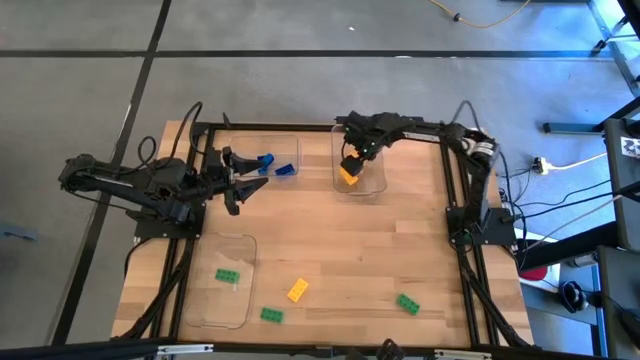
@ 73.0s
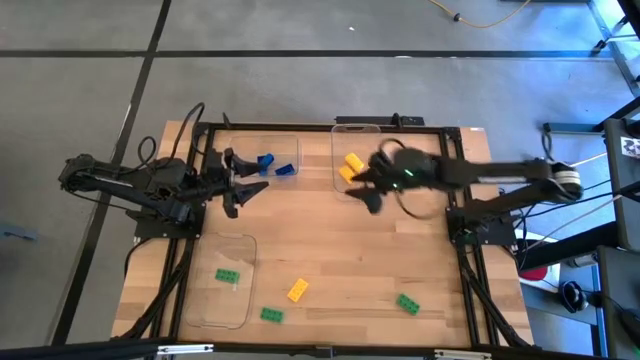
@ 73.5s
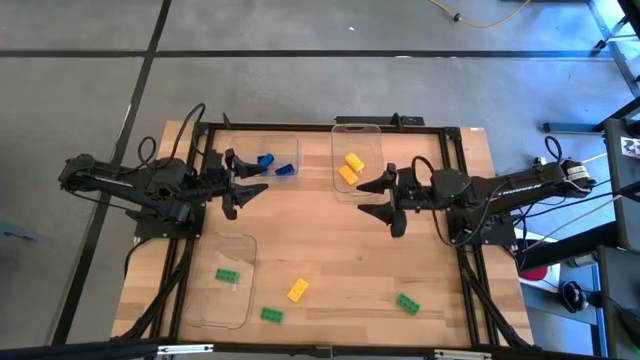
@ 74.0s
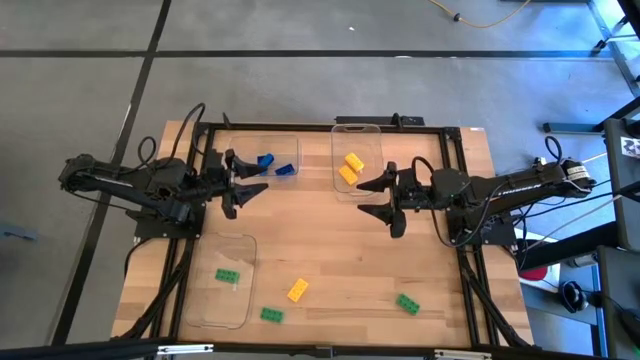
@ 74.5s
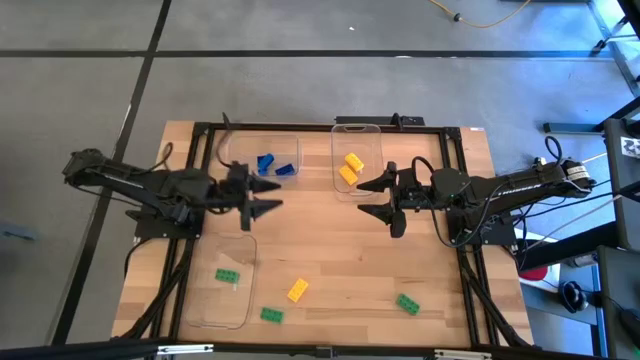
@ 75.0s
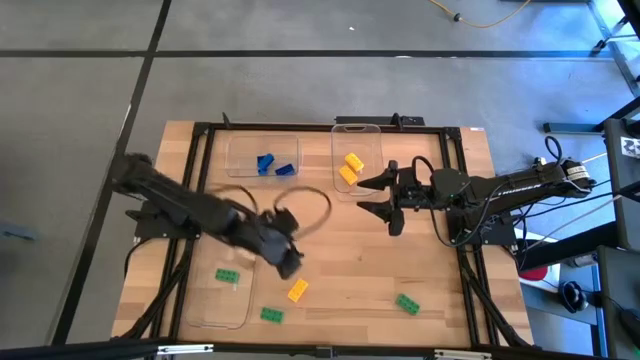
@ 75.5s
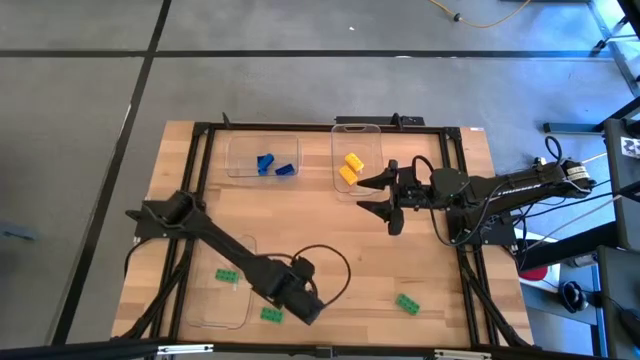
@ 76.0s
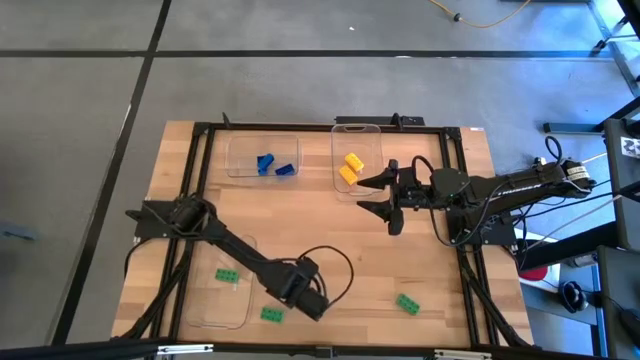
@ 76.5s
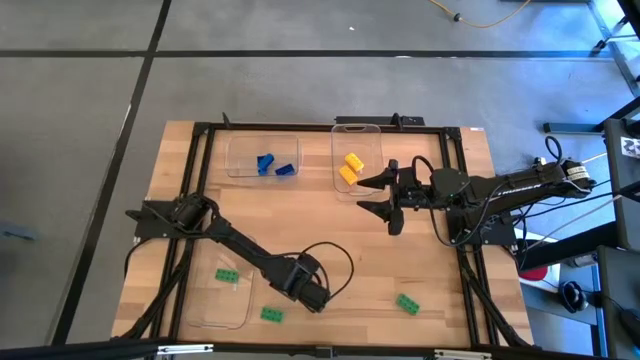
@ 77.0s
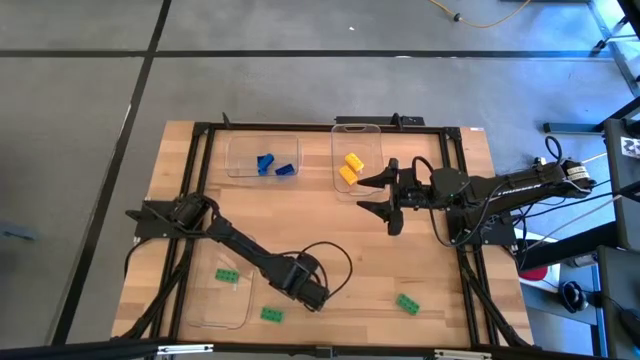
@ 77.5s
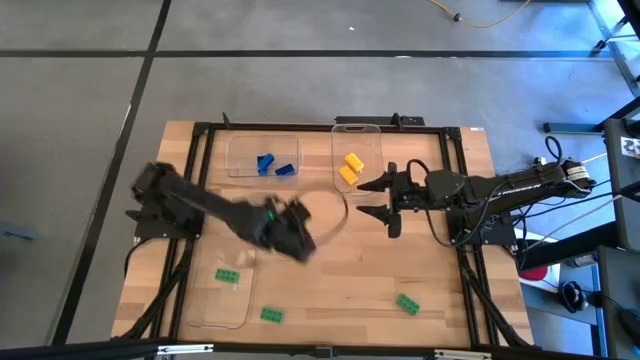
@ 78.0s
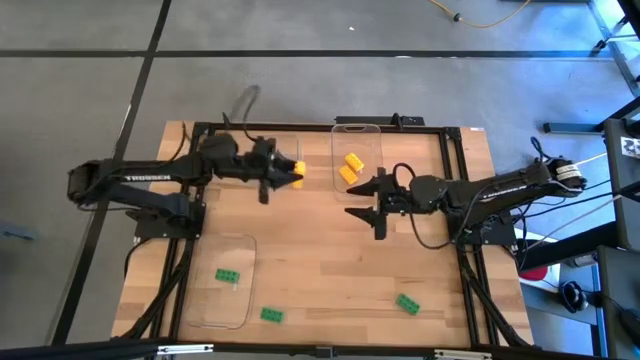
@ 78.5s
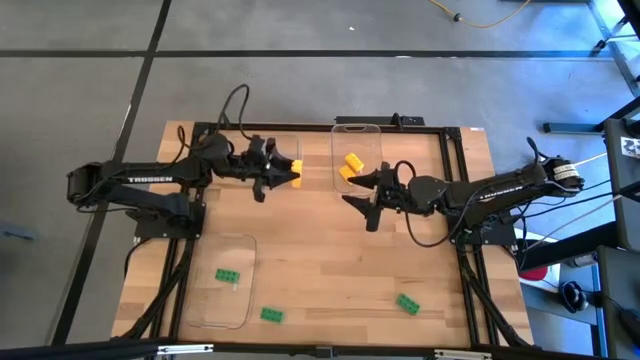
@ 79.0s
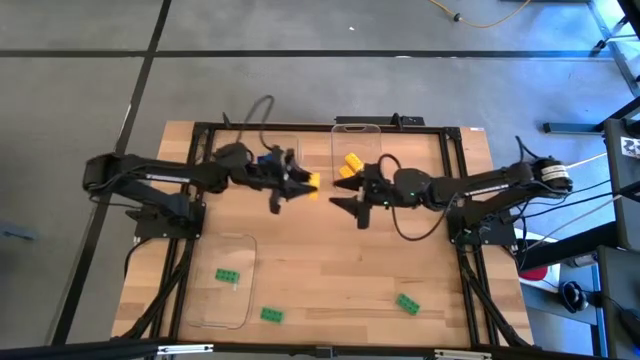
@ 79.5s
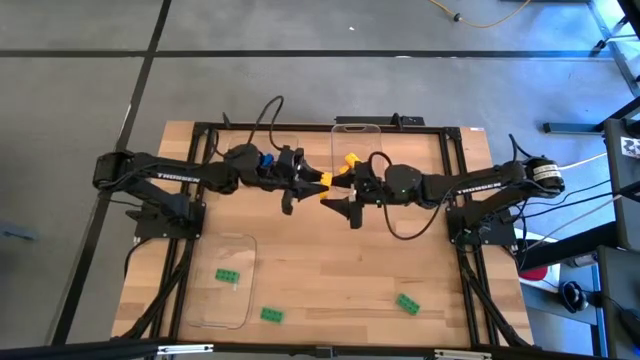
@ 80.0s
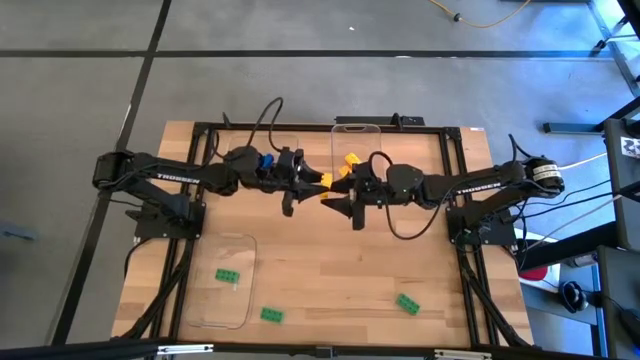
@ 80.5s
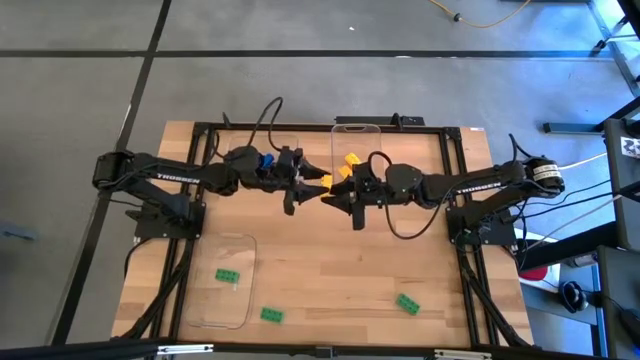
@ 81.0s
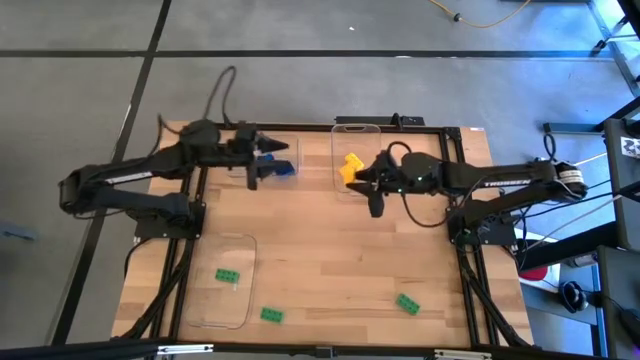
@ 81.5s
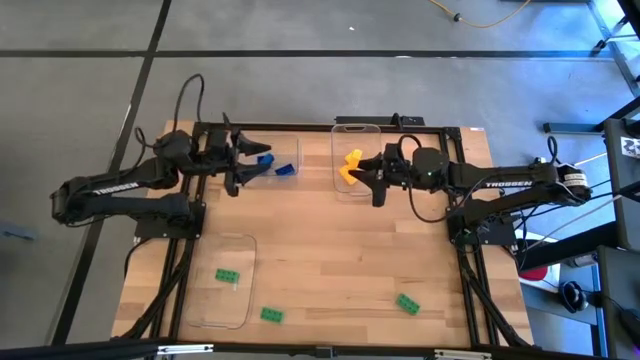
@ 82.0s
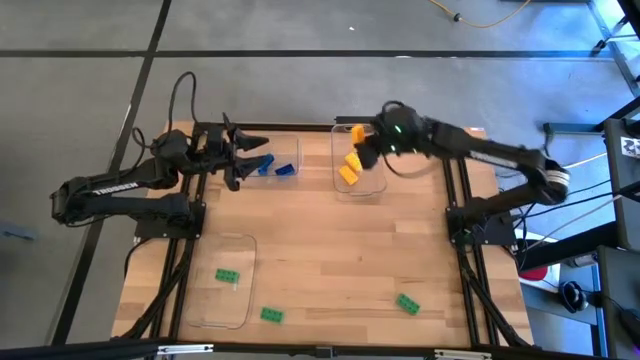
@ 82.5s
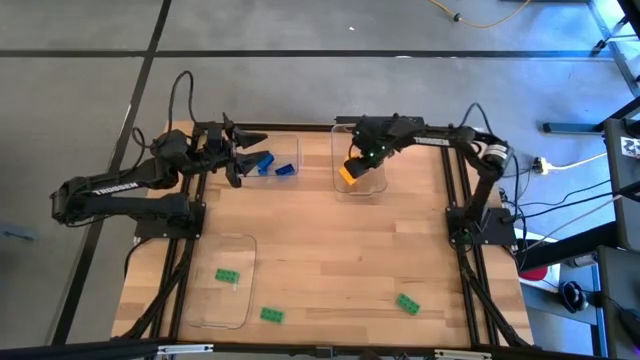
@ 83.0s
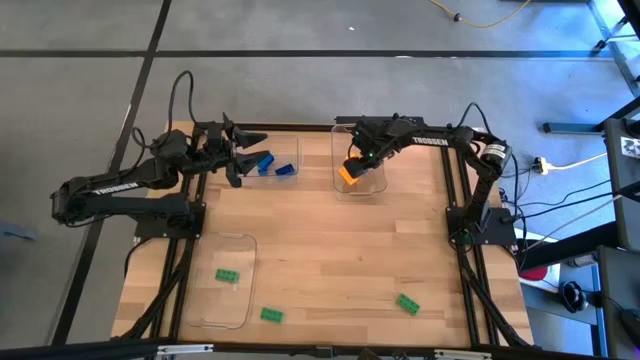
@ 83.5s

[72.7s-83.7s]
Task: Sort & place blocks by color
Put the yellow game piece into the top right transparent bin

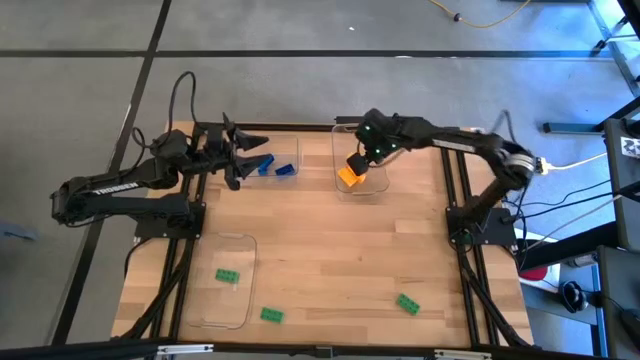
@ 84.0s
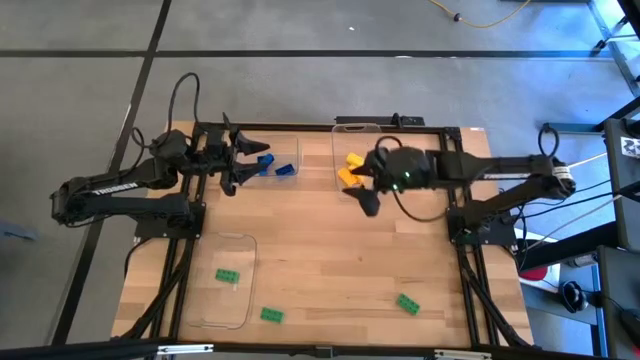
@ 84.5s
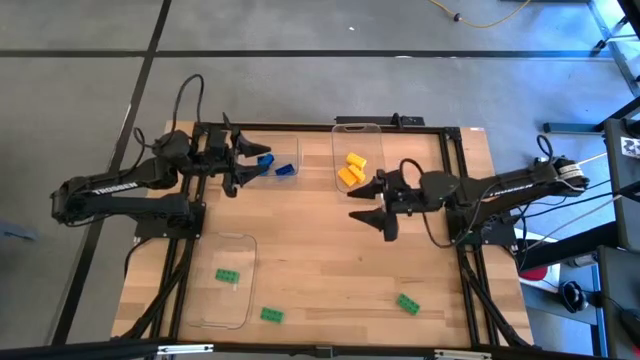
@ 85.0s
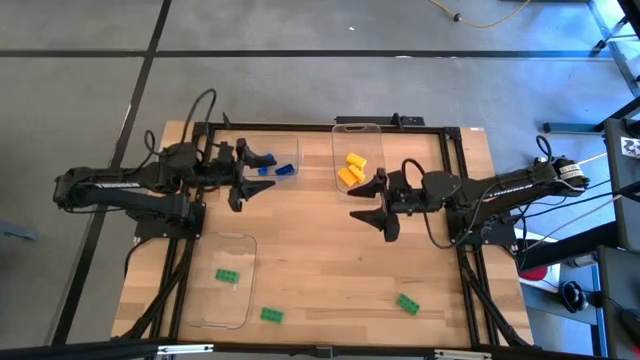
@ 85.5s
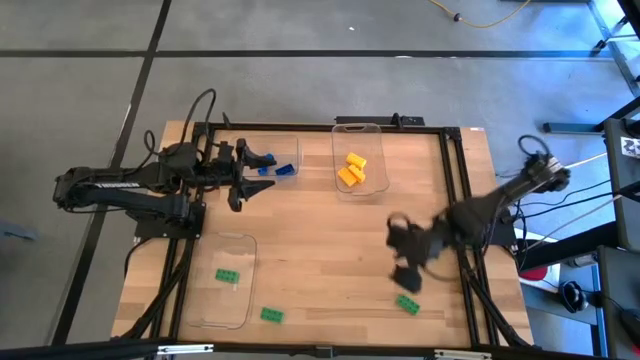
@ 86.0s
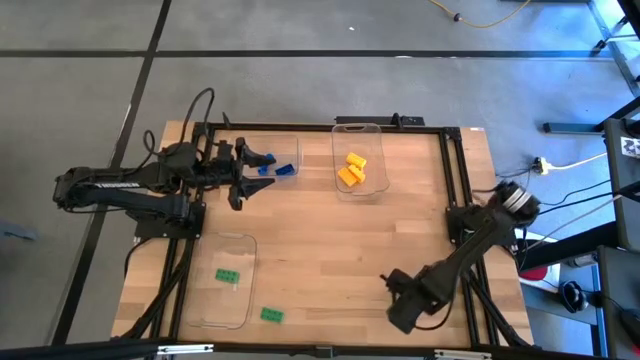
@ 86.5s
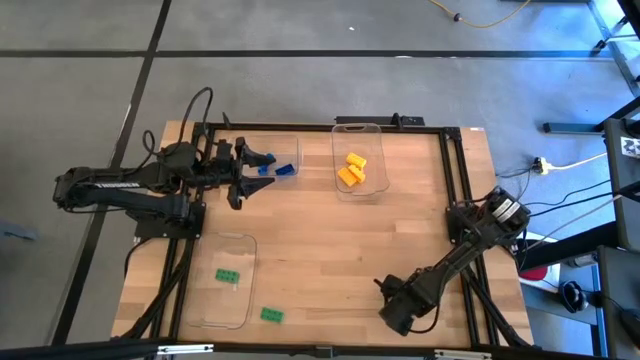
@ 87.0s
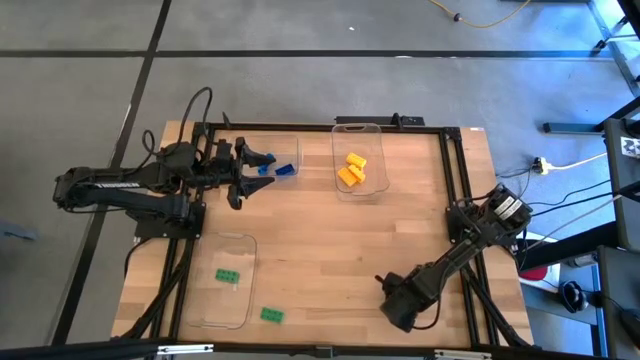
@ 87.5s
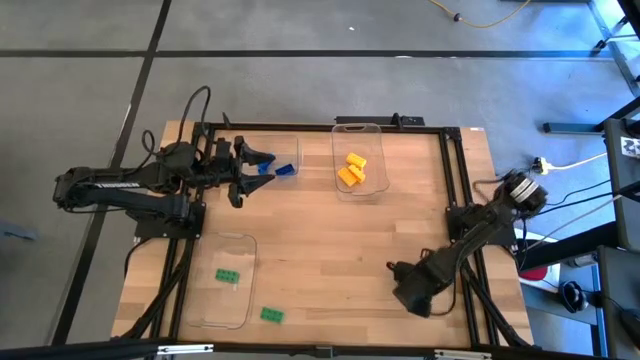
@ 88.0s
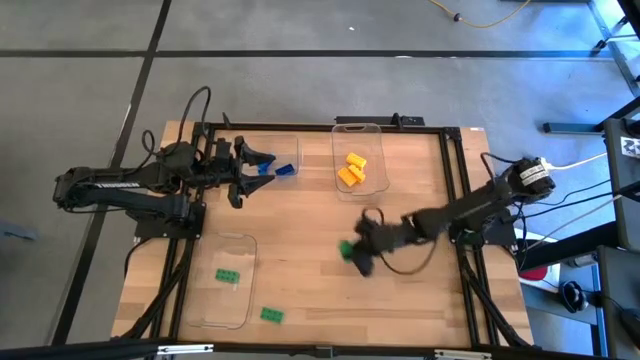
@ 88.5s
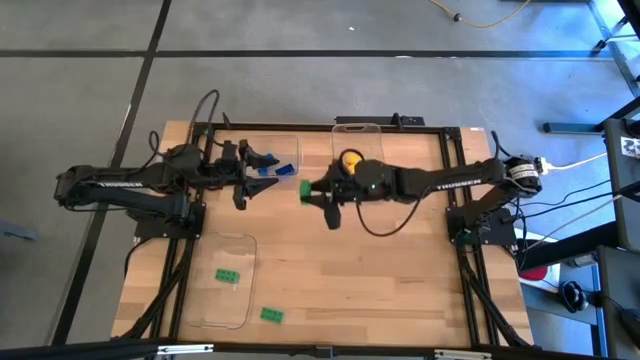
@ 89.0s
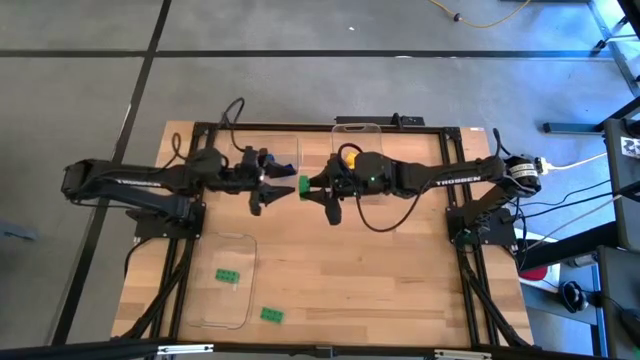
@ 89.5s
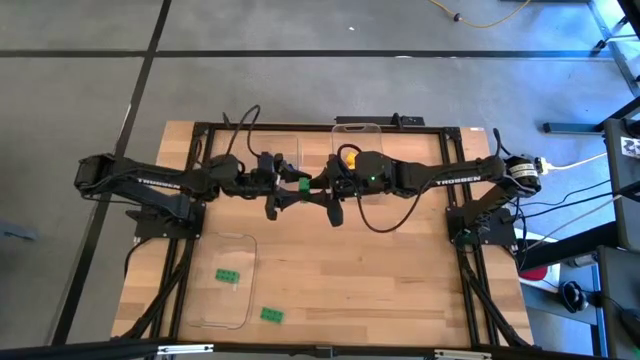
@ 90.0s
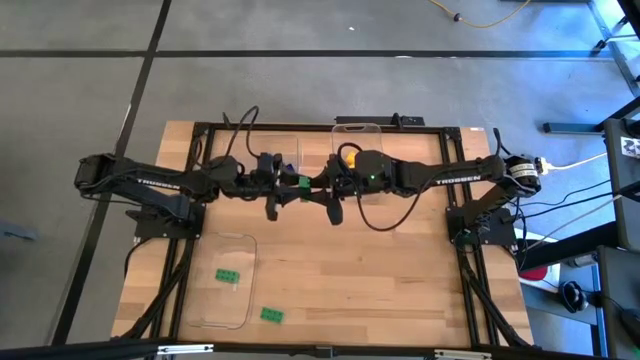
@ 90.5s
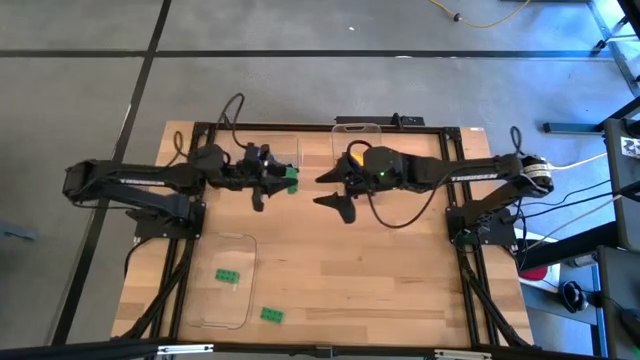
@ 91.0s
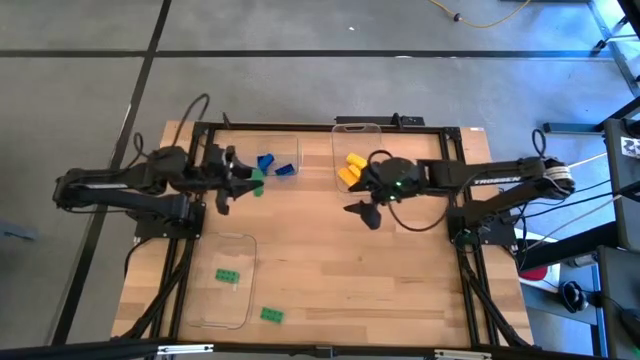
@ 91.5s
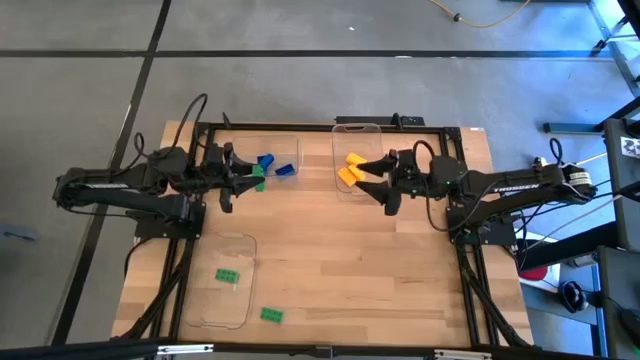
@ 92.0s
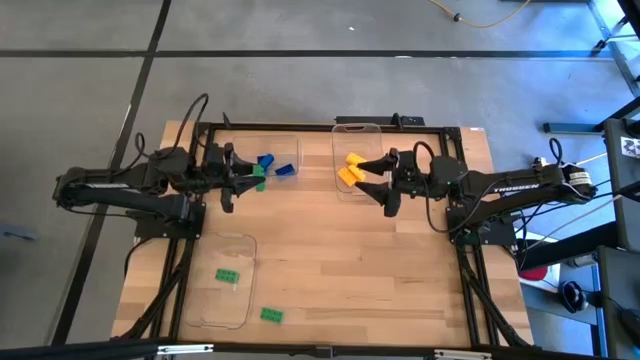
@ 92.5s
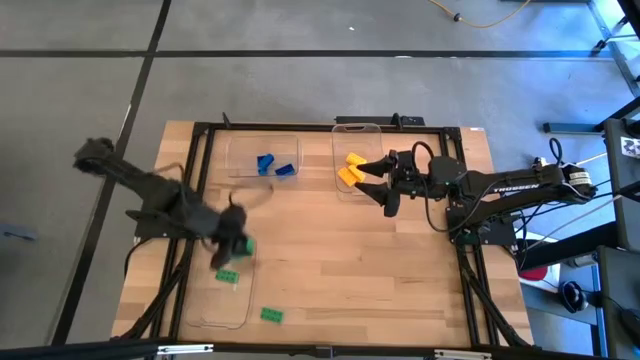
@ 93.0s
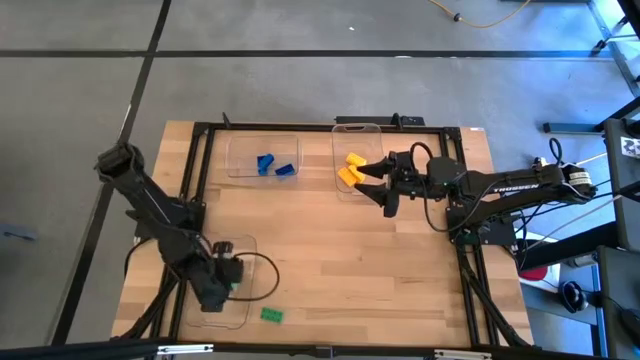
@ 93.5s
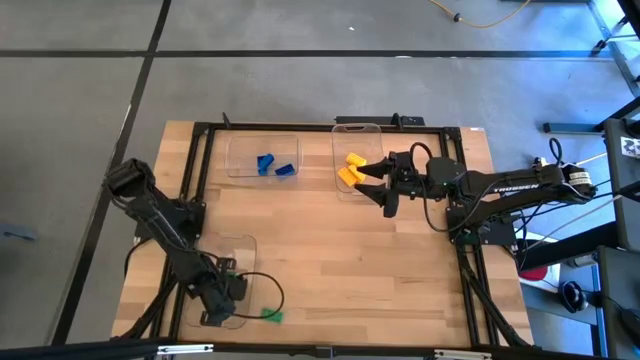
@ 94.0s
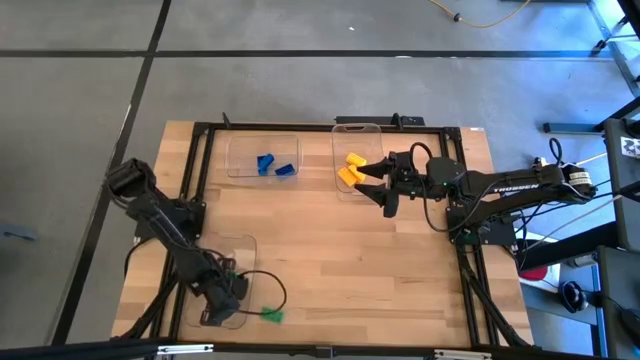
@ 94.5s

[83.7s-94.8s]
Put the right green game piece into the bottom left transparent bin
